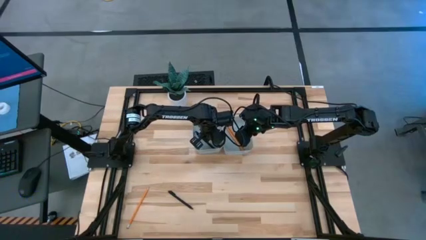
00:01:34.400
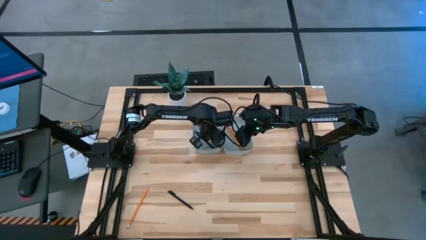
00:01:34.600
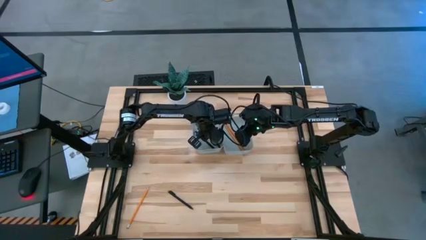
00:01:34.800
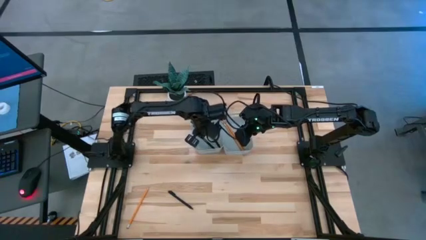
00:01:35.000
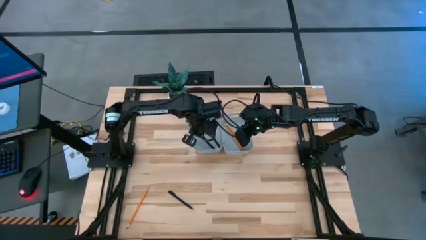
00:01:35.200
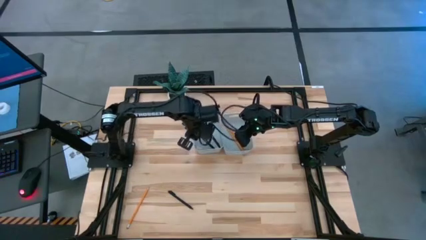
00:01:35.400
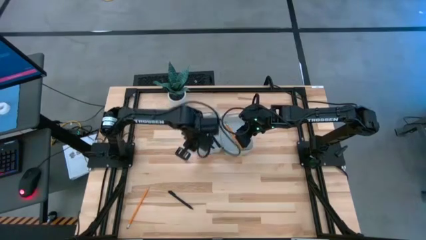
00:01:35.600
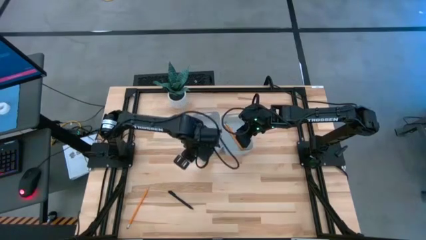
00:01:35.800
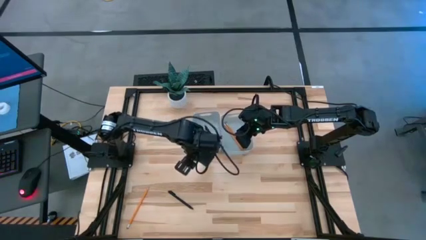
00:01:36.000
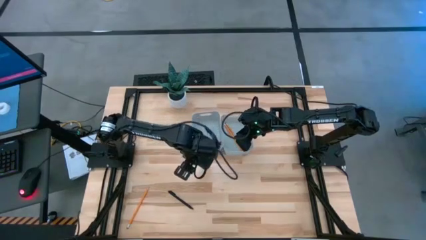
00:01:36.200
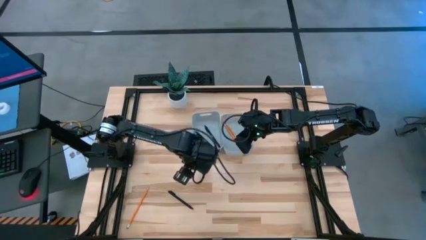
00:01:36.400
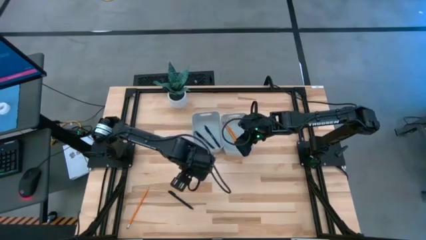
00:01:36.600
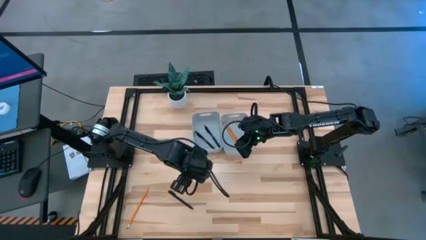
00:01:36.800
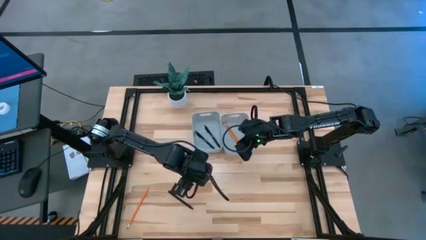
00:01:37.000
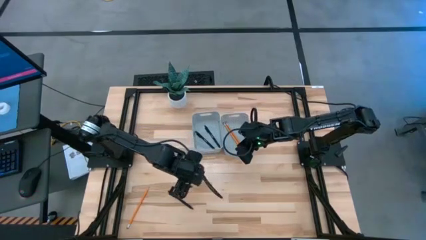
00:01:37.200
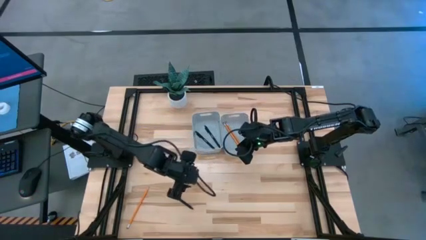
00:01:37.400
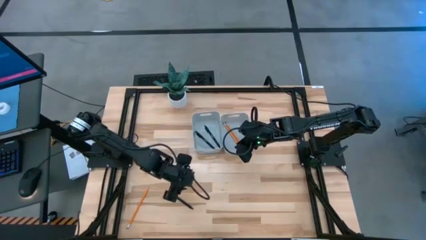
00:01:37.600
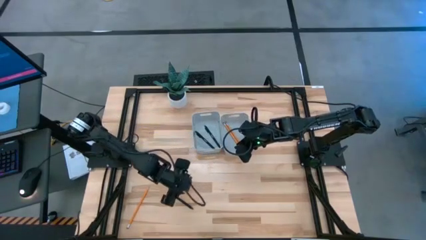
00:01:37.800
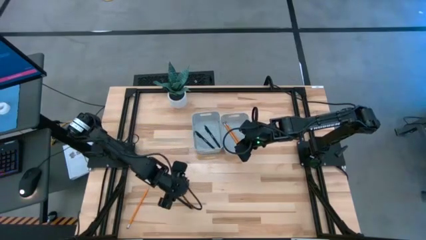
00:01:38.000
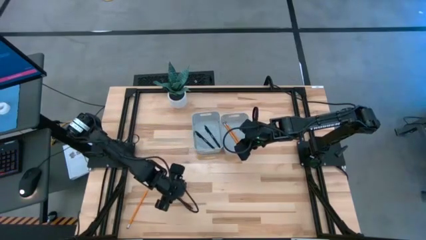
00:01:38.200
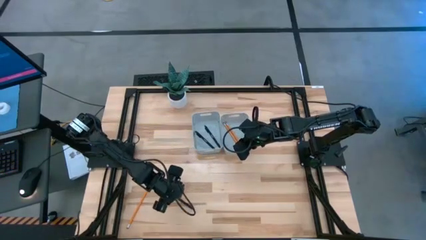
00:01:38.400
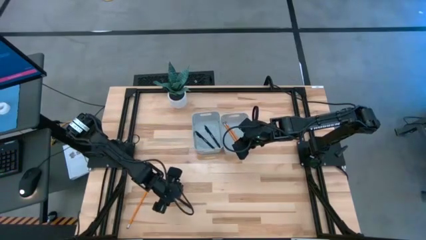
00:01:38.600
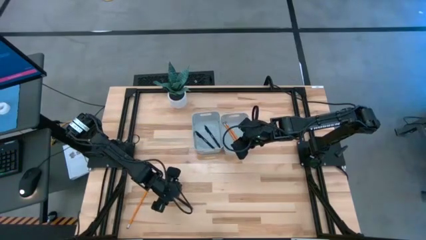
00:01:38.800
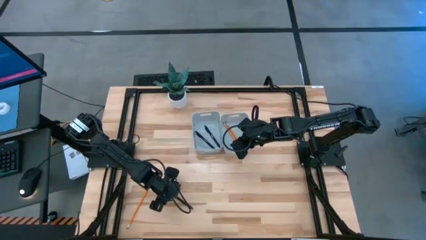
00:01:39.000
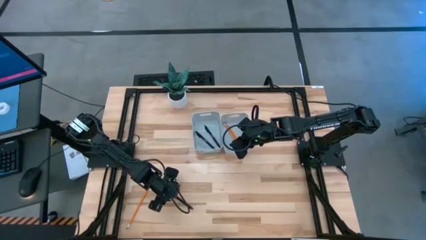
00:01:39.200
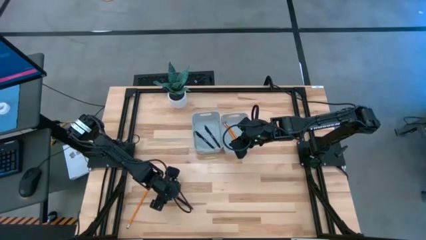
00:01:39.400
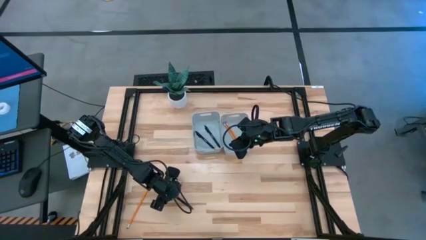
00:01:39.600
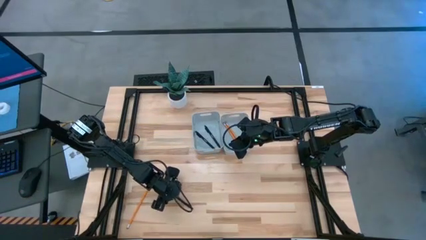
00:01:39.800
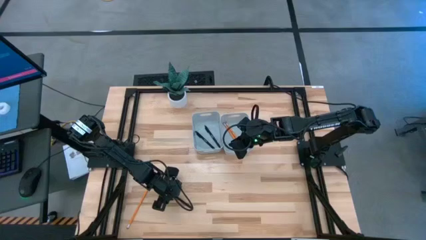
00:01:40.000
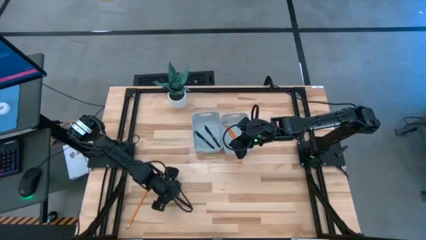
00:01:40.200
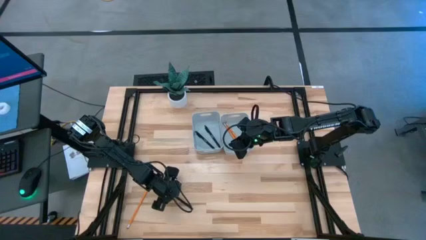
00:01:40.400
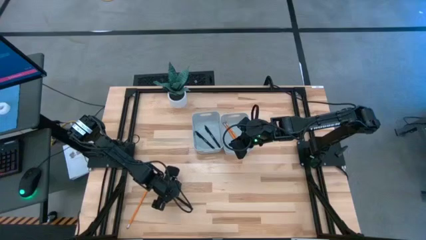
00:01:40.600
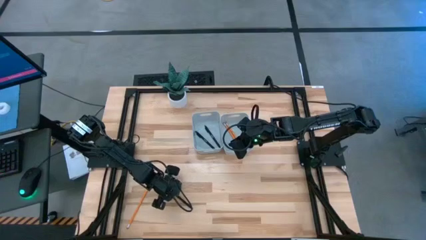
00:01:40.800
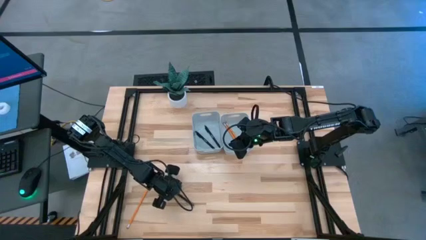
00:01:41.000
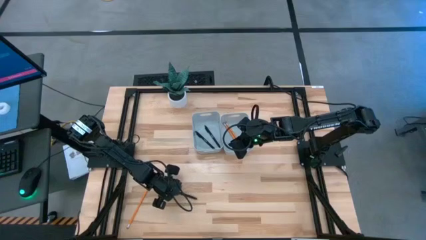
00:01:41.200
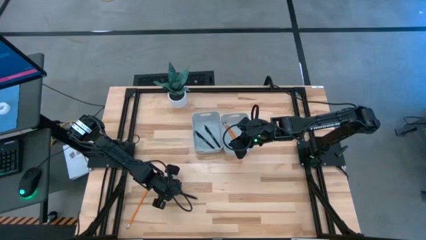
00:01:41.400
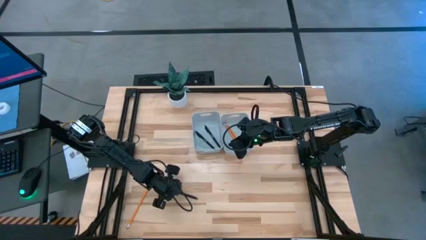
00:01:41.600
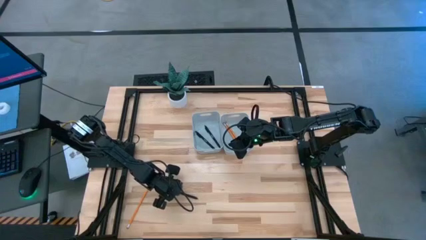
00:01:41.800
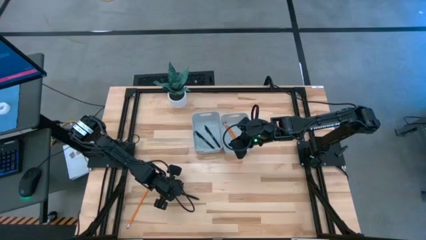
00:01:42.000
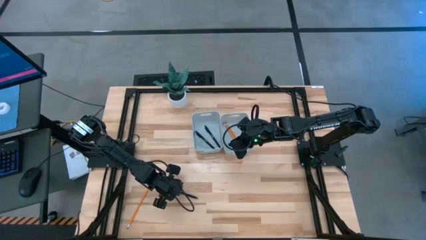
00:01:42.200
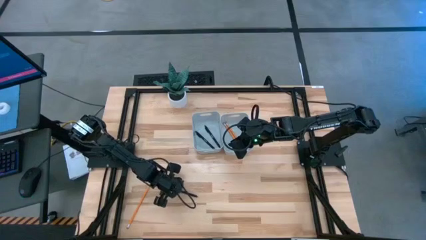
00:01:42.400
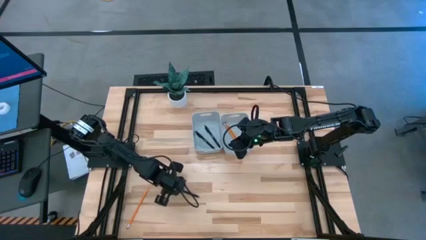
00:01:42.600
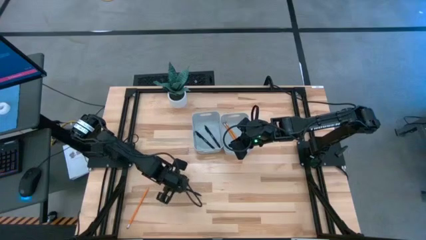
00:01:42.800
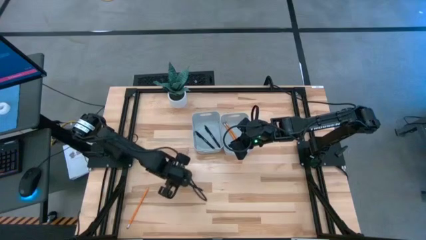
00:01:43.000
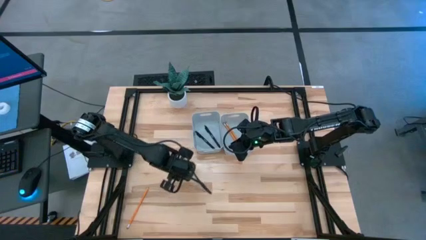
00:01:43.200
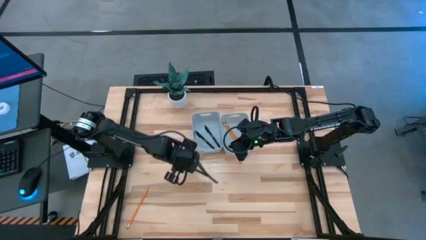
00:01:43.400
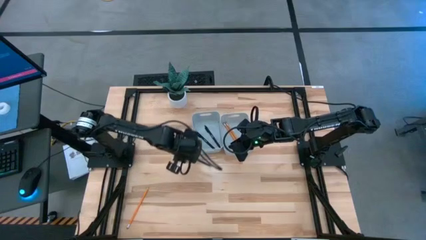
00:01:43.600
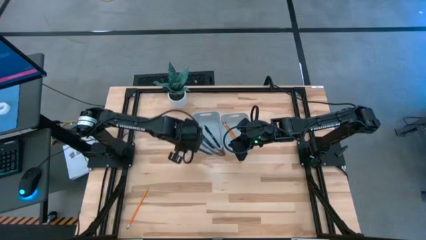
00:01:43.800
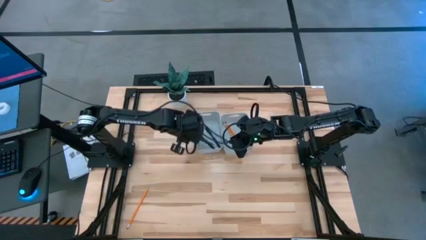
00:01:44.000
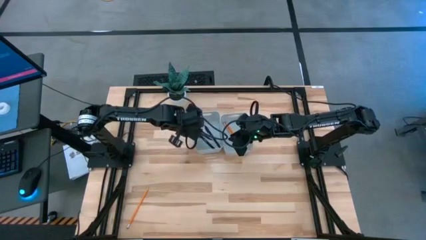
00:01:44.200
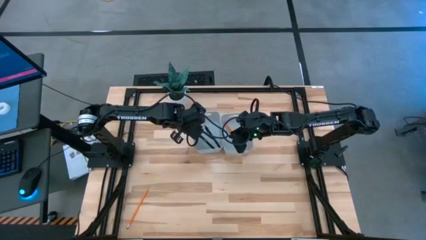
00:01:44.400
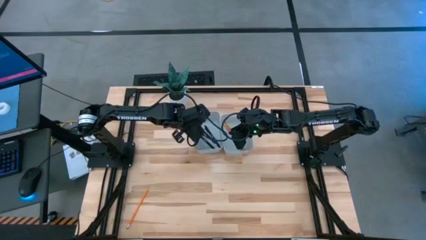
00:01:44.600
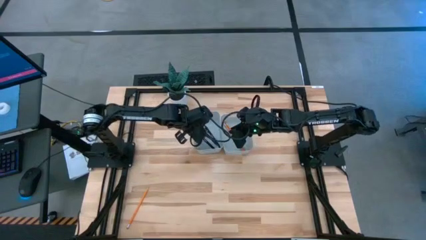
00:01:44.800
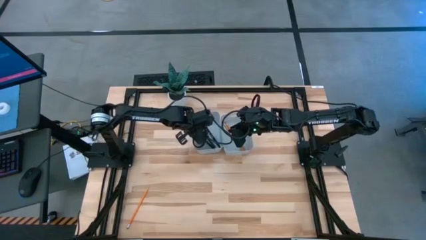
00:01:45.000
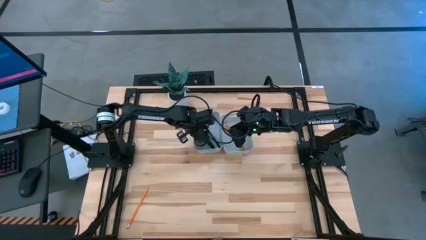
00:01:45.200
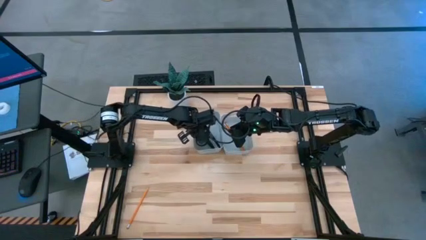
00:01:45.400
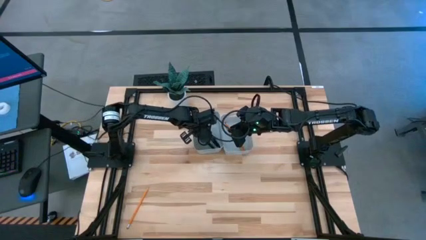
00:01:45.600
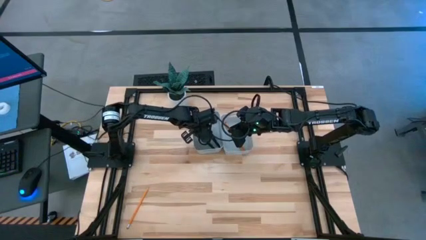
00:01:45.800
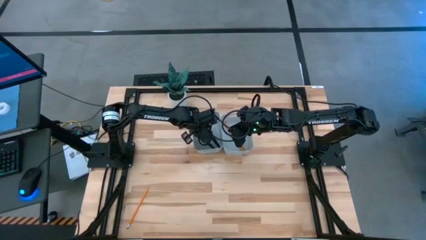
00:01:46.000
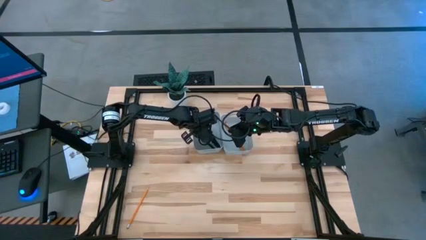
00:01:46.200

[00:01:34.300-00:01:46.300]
Task: Sort pens & pencils
Put the black pen into the left gray bin

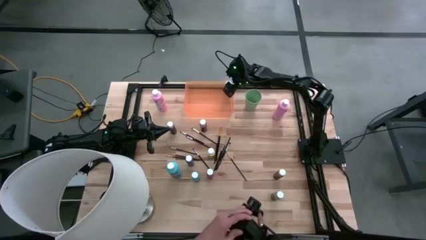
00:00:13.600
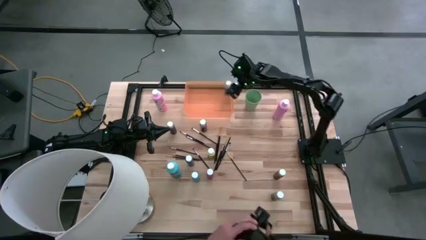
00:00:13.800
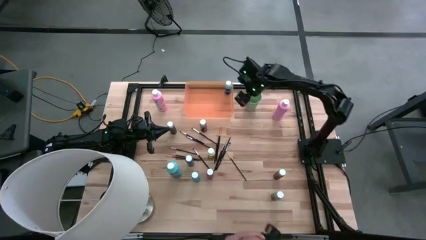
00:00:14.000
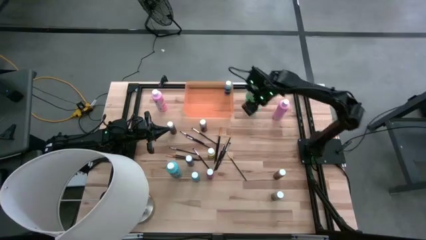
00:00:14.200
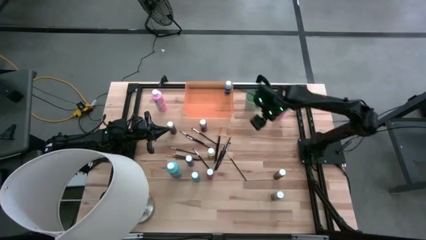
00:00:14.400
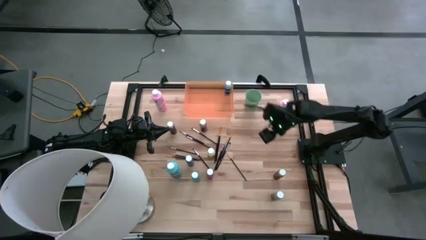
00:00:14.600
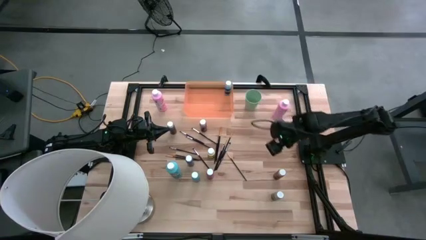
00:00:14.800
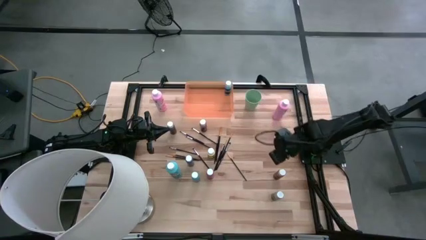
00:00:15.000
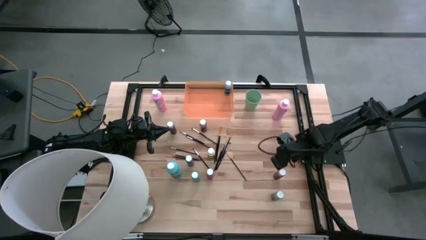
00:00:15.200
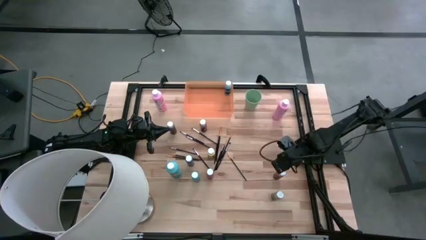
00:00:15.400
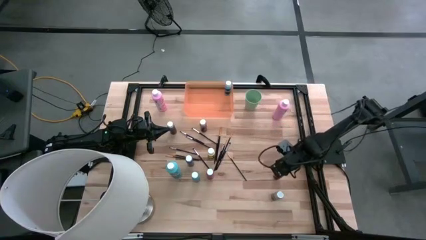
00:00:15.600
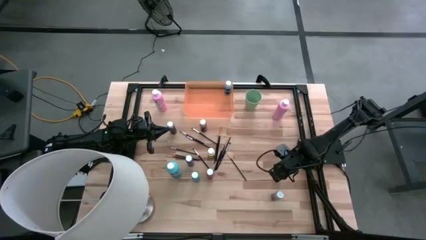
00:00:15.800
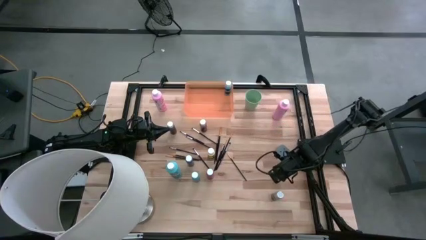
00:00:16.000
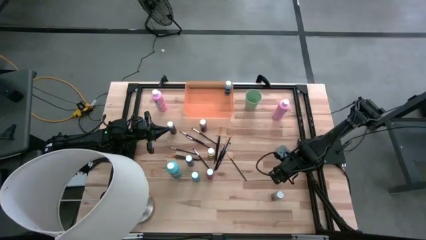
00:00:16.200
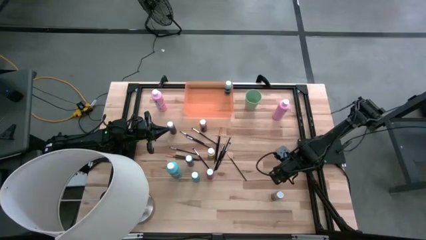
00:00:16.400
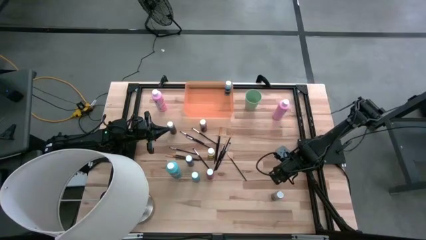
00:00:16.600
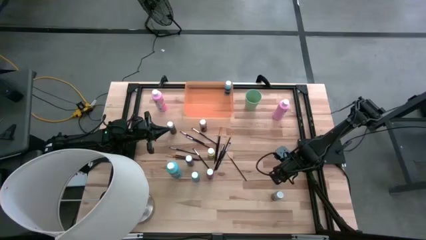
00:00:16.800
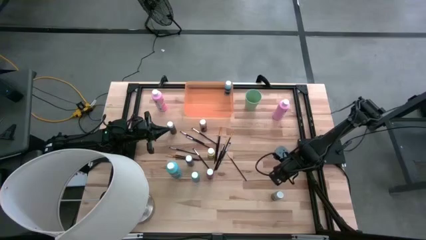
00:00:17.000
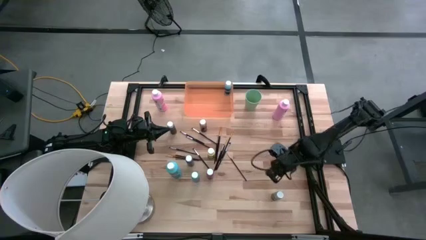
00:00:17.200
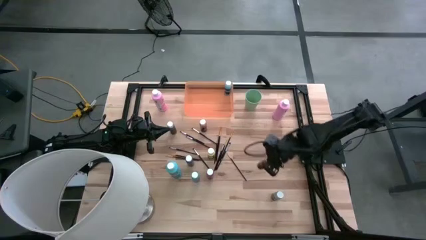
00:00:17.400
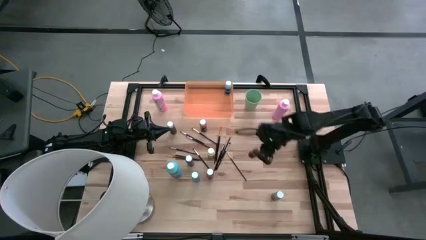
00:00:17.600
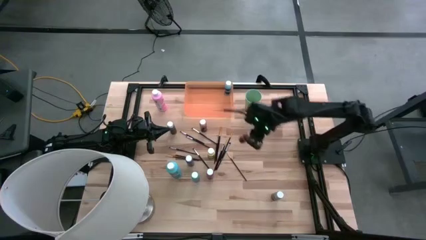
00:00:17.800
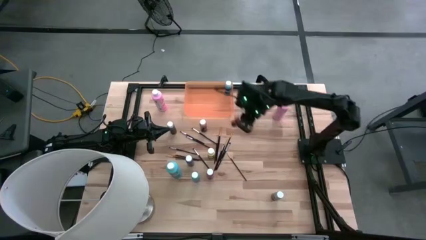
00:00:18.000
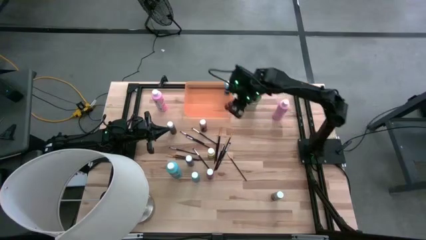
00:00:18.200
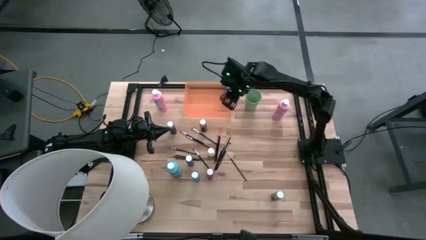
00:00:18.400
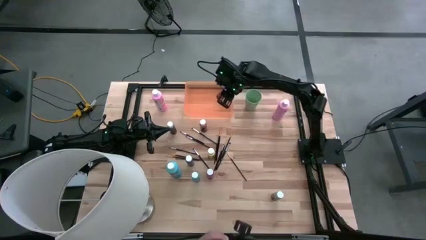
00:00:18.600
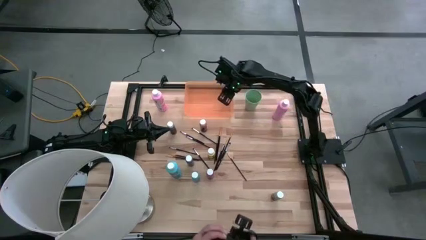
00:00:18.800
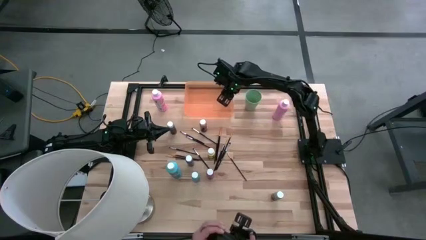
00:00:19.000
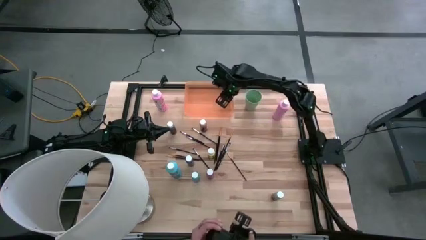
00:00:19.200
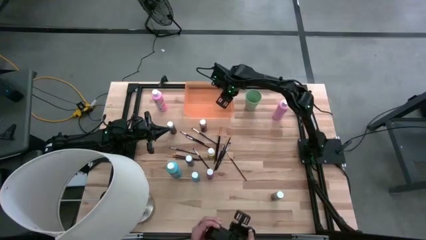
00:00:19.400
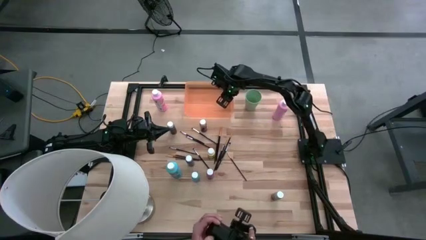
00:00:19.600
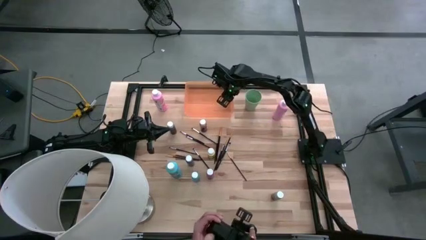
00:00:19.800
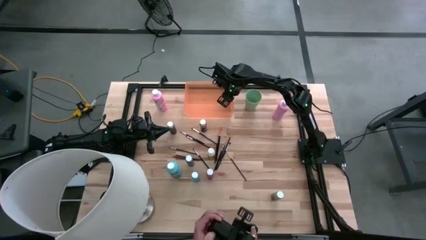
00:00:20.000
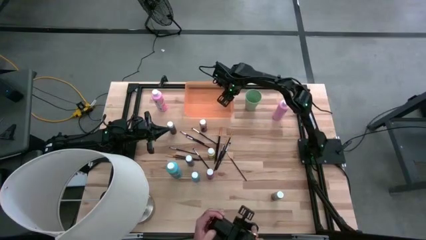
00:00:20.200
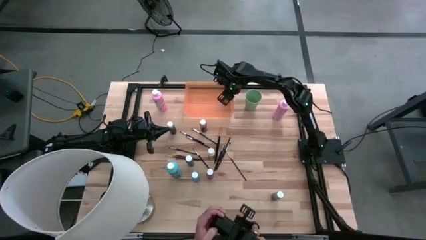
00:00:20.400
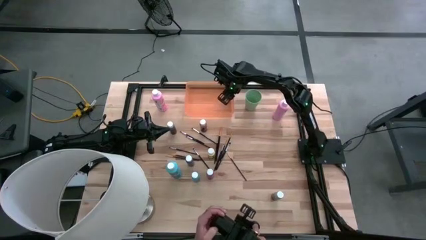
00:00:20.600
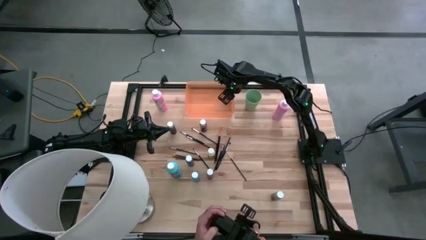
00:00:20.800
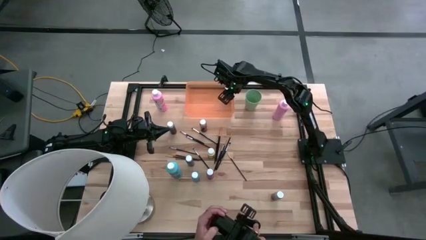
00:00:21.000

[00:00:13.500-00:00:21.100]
Task: Pick & Place Paint Supplies
Put the small orange paint bottle into the orange bin
